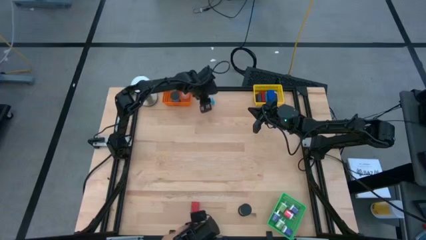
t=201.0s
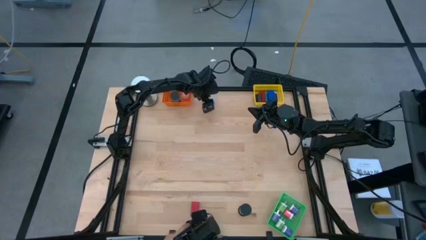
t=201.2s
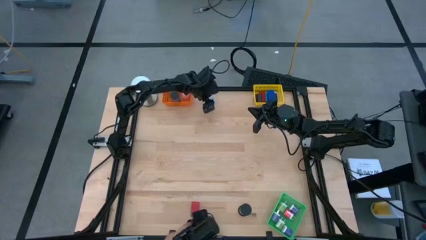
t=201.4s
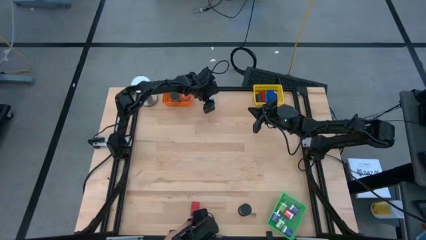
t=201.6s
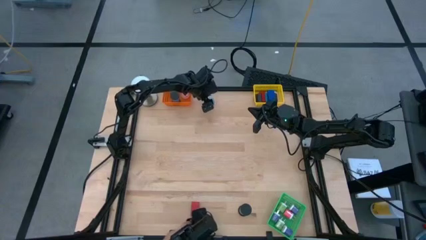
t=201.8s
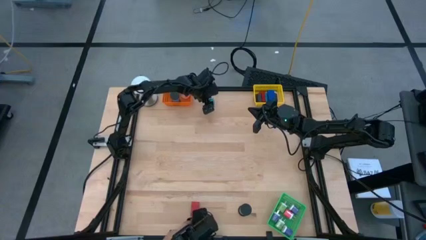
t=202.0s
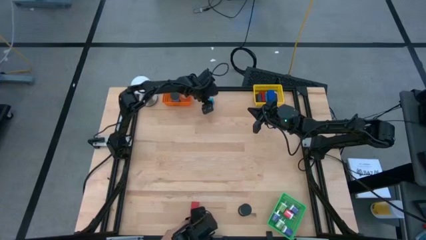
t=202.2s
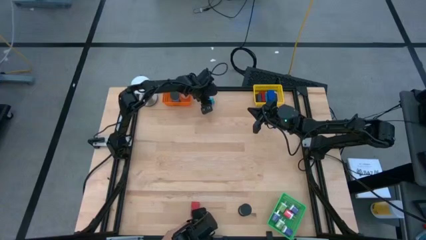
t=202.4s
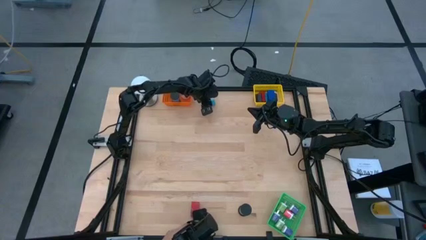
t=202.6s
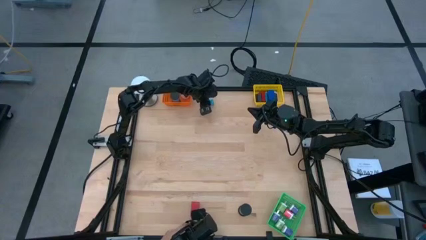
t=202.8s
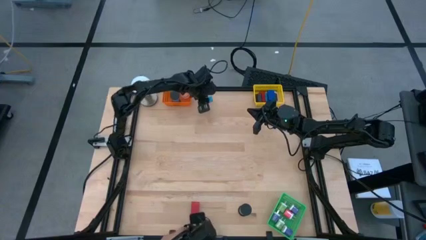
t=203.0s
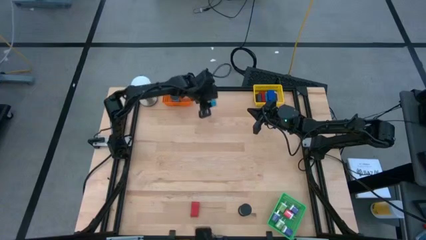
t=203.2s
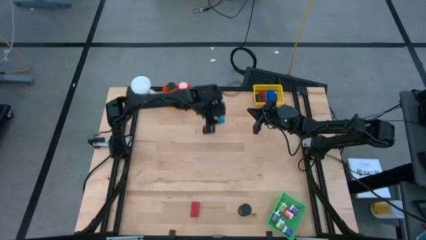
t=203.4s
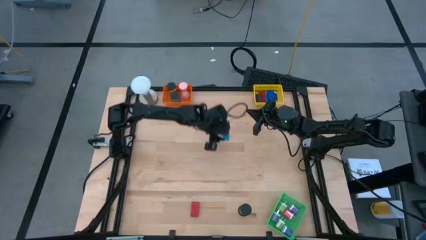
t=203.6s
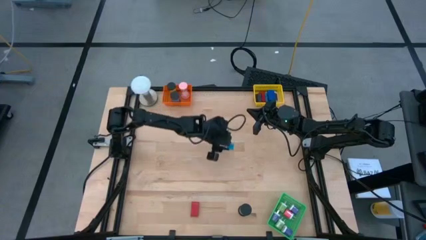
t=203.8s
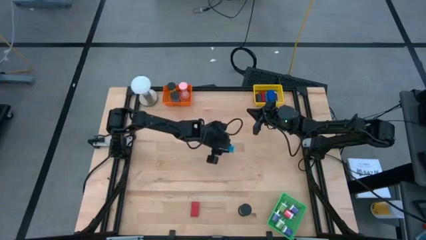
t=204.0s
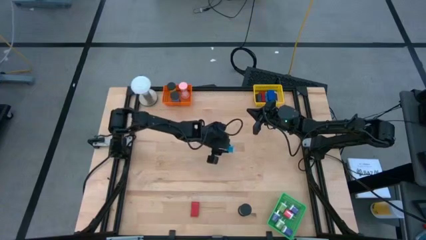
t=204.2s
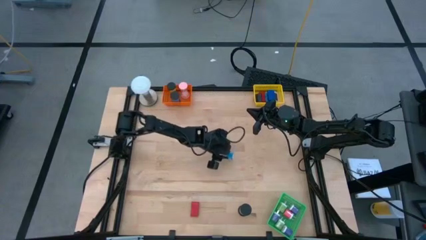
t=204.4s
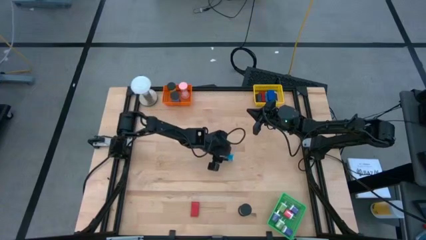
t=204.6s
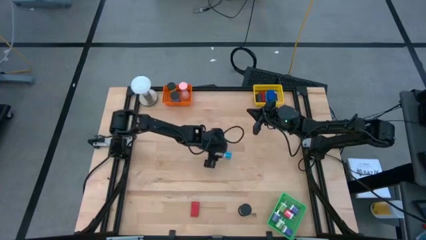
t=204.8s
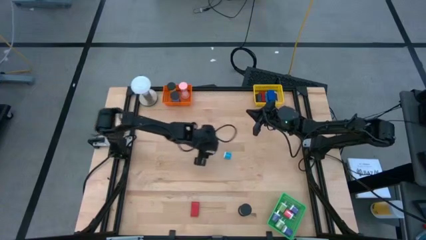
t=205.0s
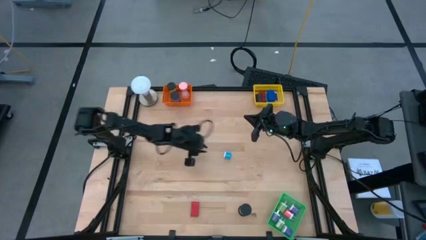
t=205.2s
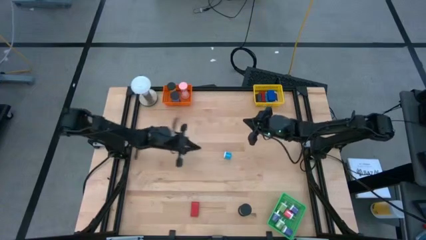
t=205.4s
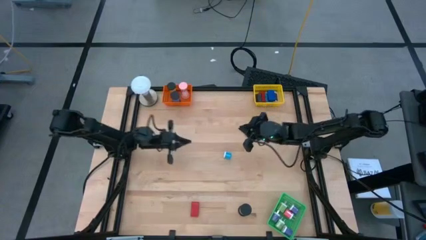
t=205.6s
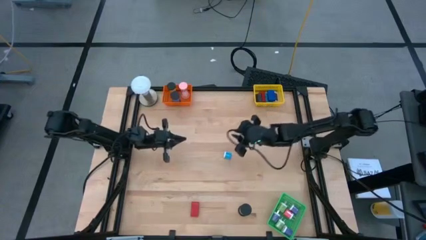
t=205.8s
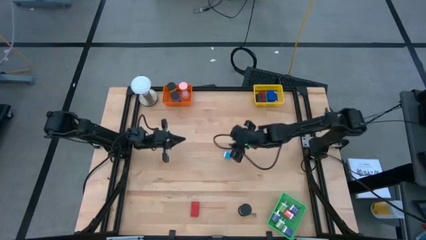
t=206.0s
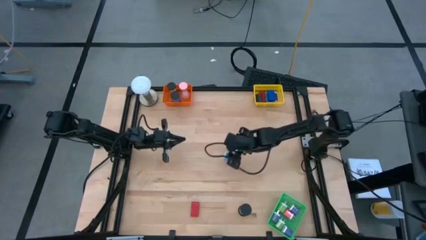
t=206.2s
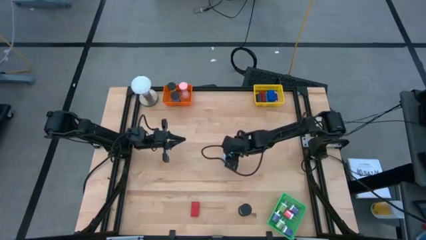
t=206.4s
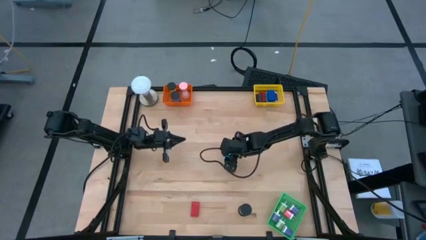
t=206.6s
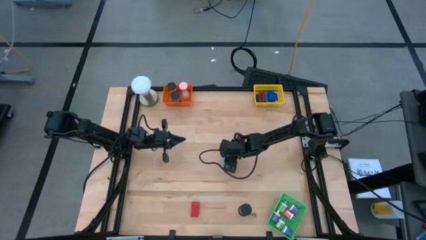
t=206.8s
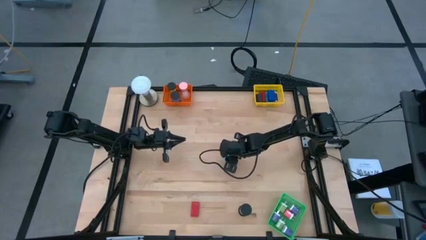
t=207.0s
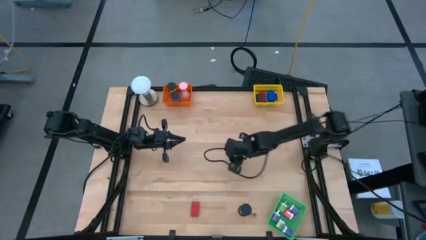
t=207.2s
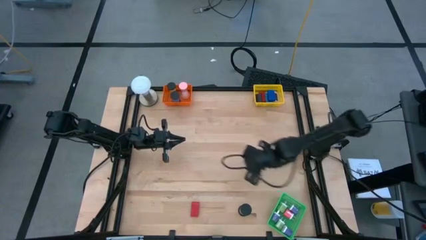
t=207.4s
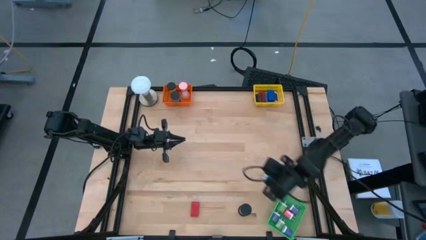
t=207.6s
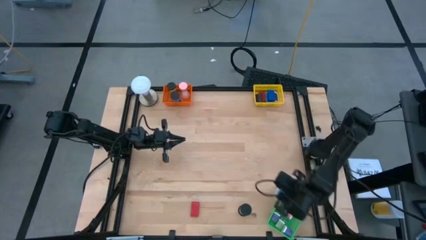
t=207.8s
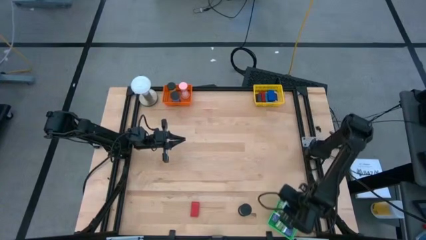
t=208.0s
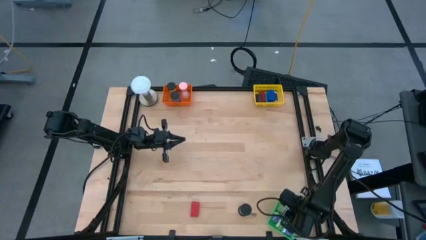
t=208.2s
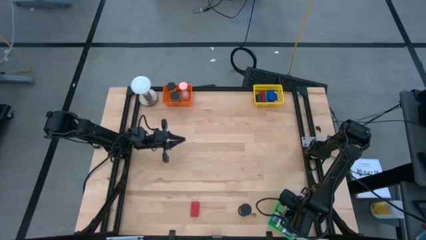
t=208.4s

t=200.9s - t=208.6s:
Task: Pick & Place Office items
Put the blue charger adapter into the green basket

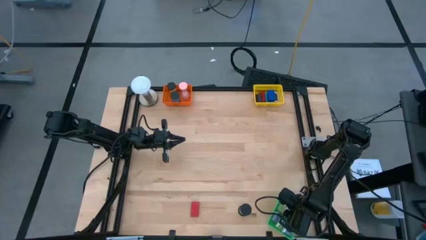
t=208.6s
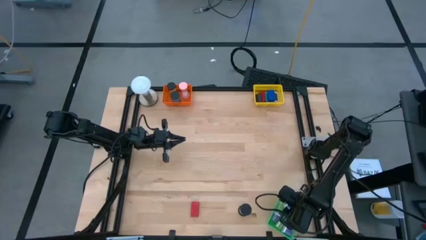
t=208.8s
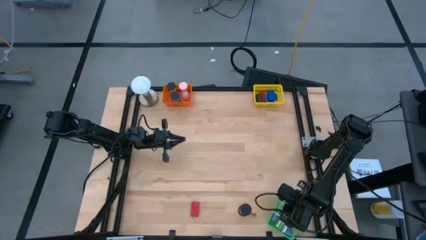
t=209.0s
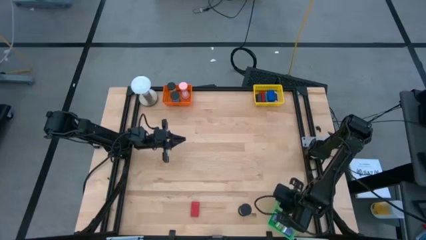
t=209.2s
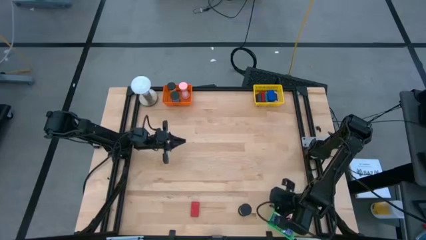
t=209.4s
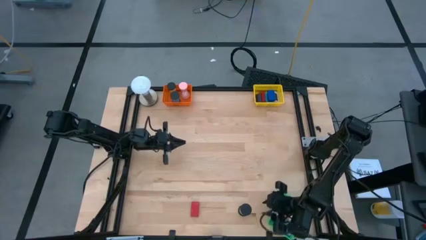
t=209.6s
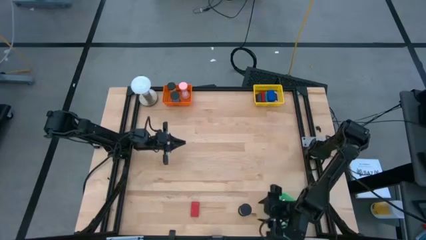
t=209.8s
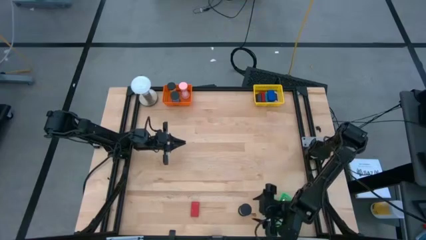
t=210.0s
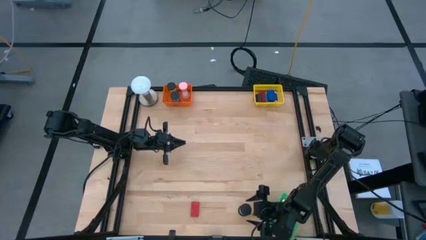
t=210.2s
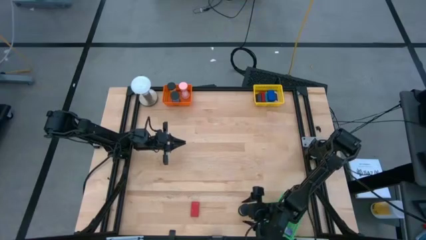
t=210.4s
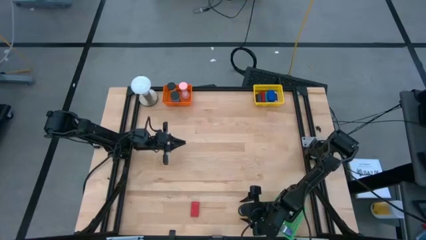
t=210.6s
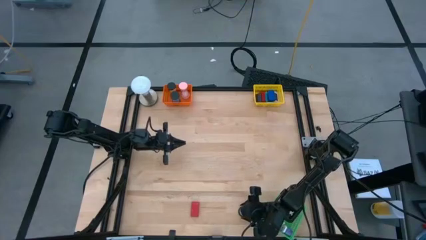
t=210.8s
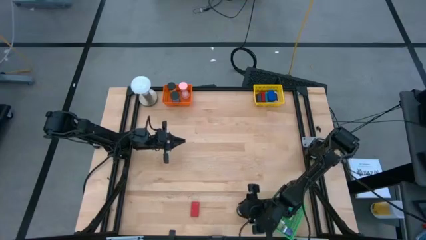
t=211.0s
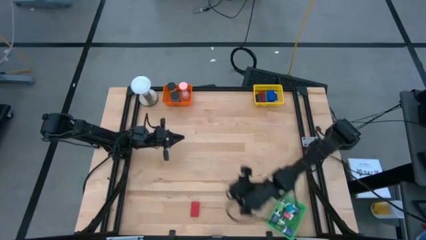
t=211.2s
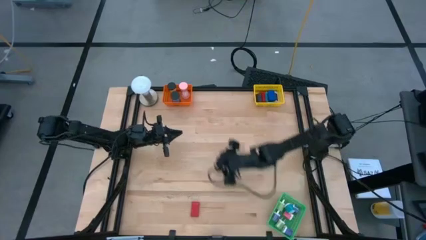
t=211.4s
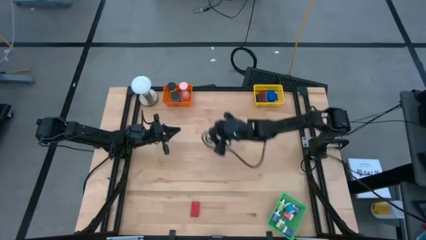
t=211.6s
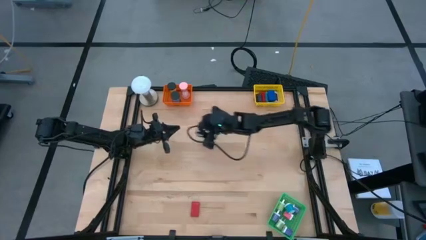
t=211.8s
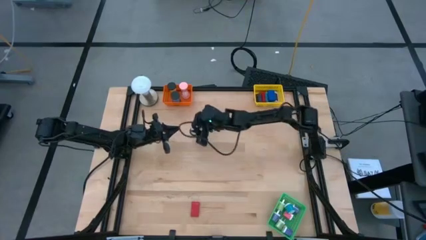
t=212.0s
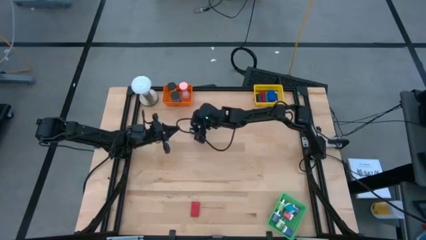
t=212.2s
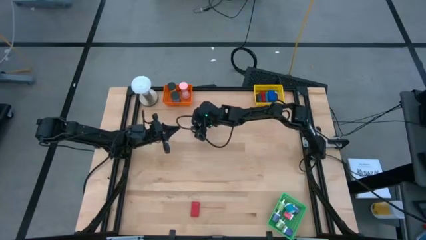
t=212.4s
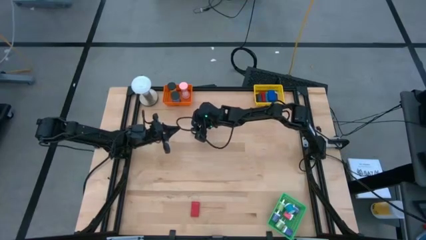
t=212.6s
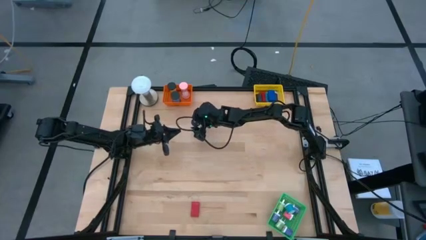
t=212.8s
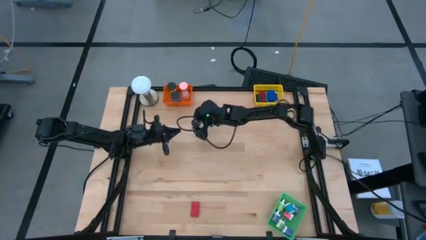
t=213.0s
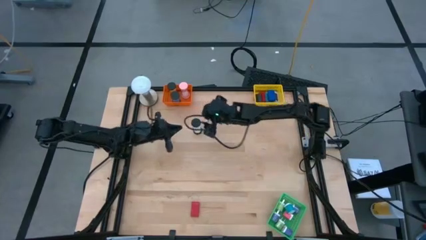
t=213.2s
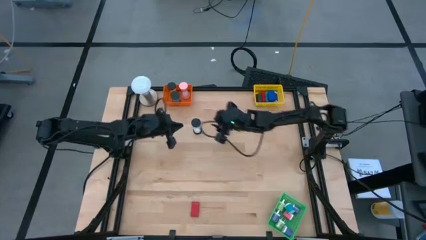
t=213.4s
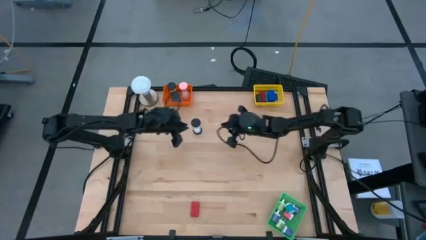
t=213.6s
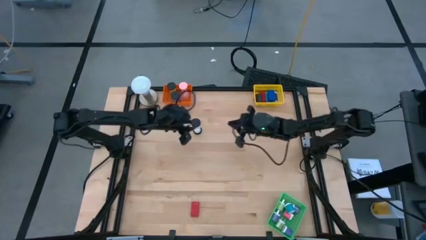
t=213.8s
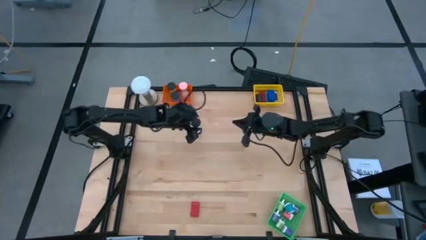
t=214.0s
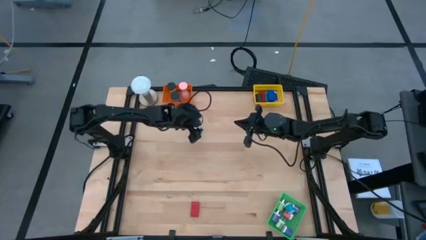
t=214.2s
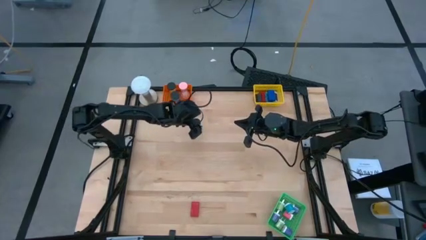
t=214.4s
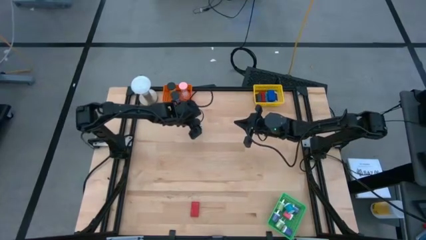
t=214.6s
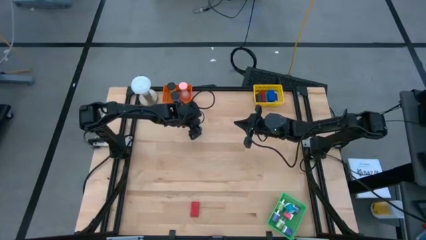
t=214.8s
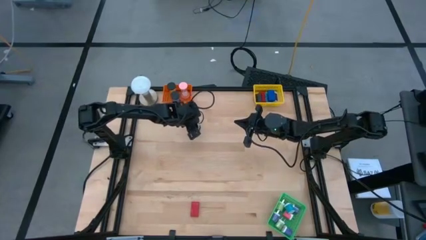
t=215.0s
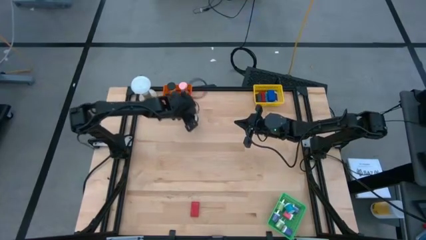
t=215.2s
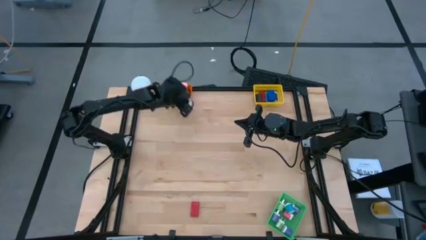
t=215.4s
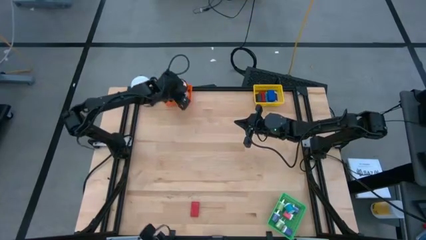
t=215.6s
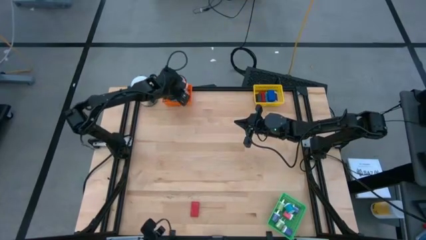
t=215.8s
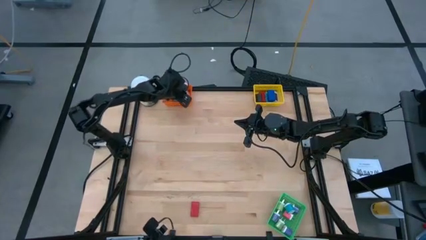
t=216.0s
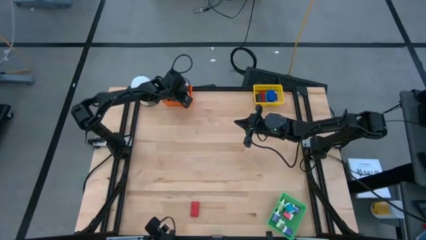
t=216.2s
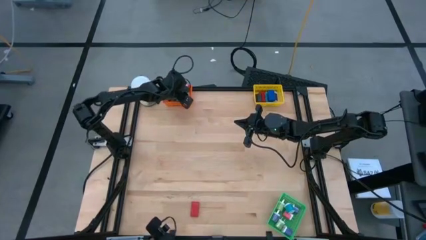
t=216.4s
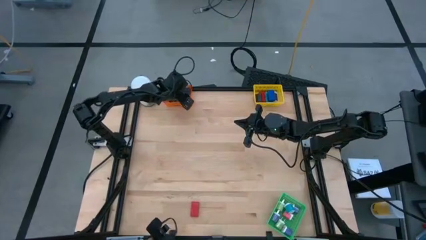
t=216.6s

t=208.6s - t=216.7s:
Put the black hourglass into the orange basket

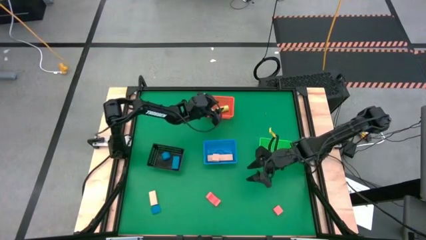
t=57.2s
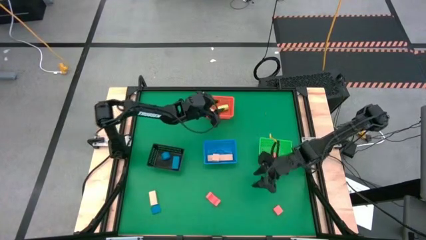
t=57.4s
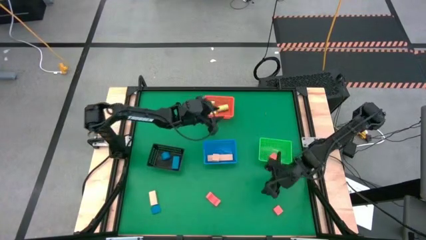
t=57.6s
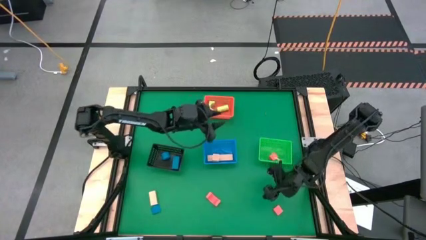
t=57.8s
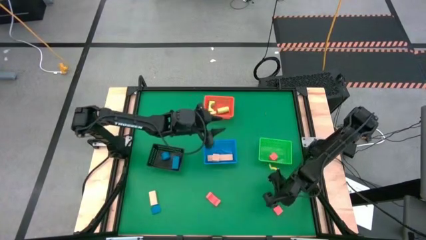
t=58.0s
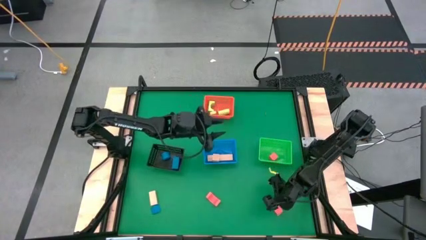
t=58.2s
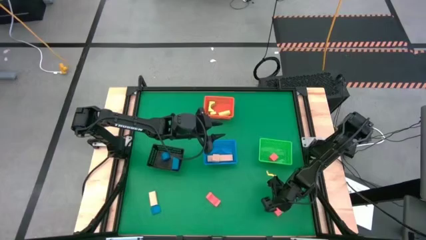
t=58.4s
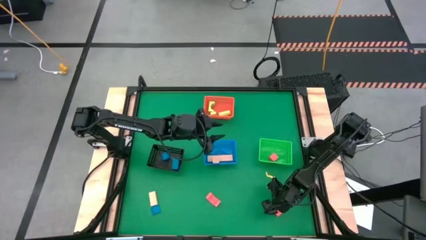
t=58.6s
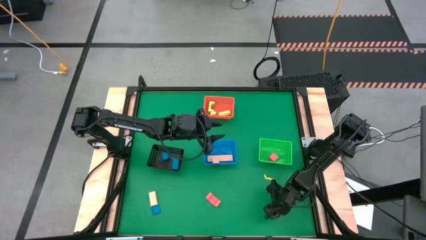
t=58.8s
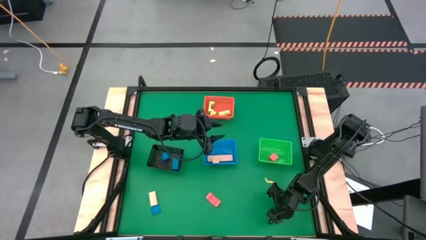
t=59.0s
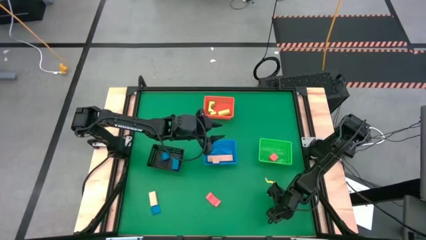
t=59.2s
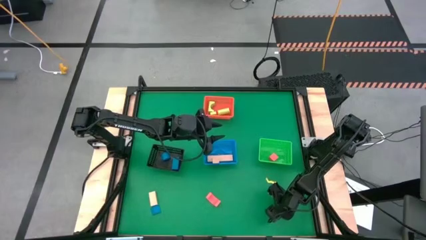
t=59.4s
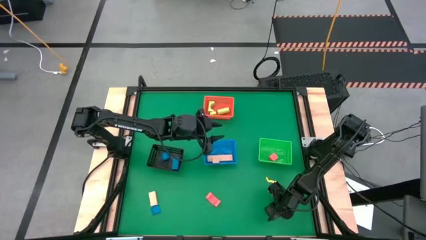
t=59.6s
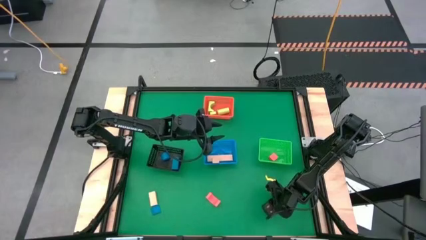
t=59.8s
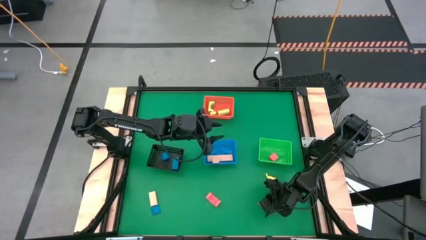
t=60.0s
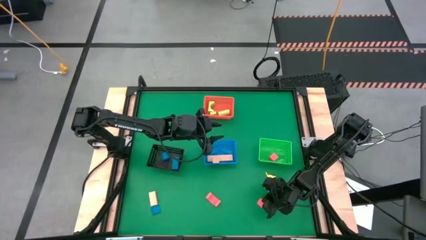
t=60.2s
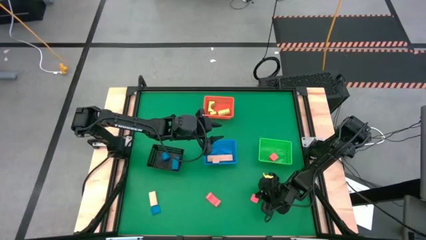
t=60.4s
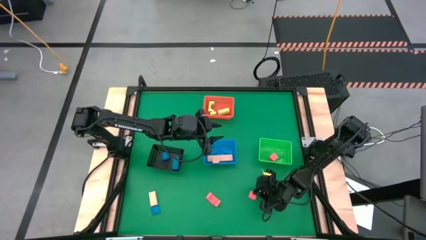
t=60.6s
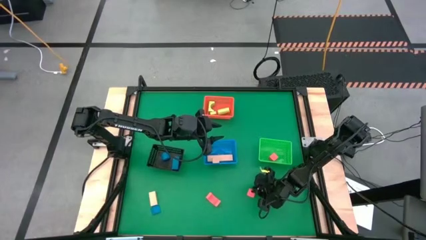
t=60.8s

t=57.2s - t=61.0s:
Task: Sort & place blocks by color
Put the right red block into the green bin
